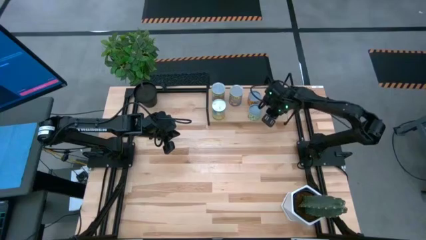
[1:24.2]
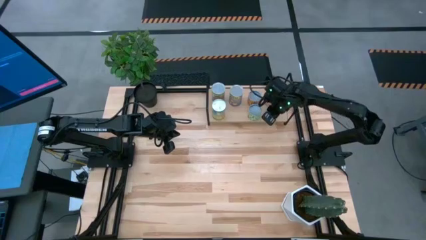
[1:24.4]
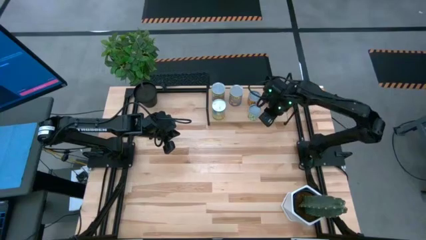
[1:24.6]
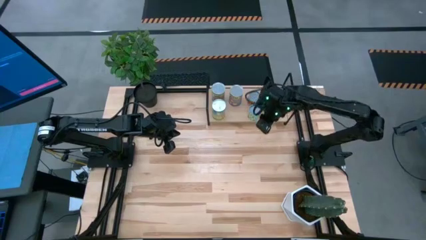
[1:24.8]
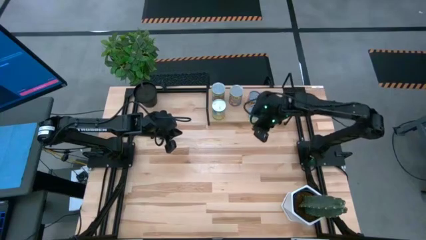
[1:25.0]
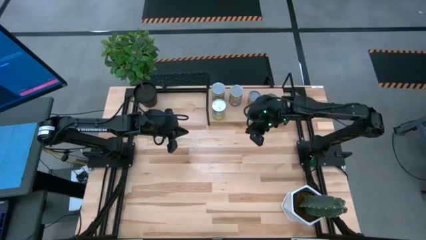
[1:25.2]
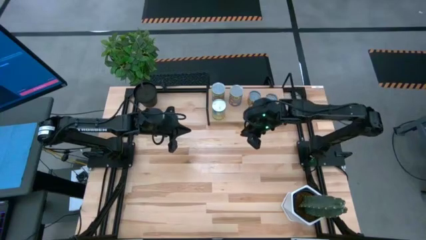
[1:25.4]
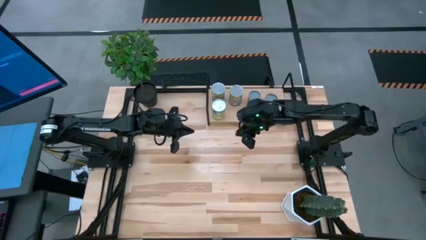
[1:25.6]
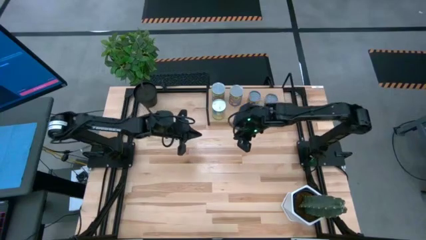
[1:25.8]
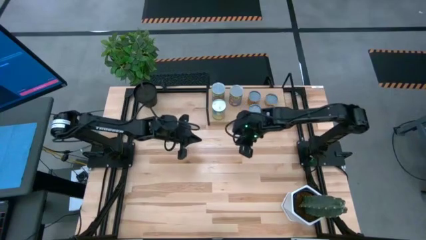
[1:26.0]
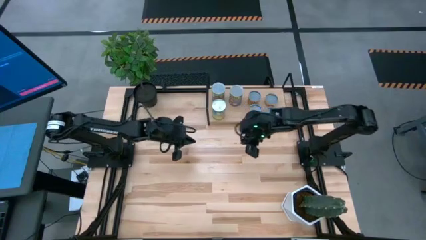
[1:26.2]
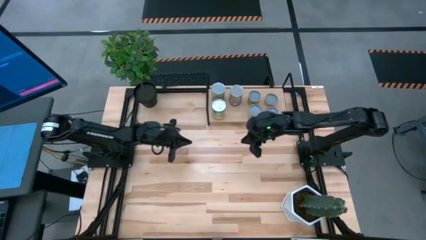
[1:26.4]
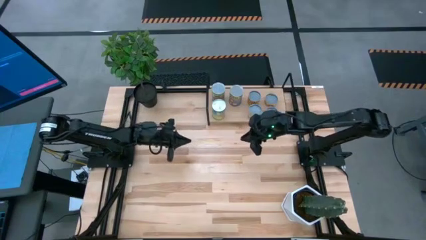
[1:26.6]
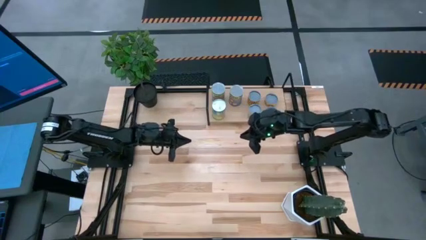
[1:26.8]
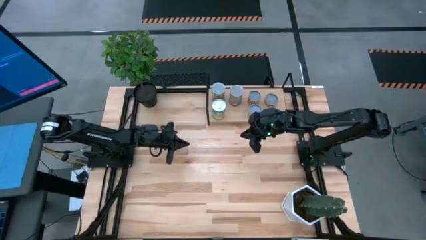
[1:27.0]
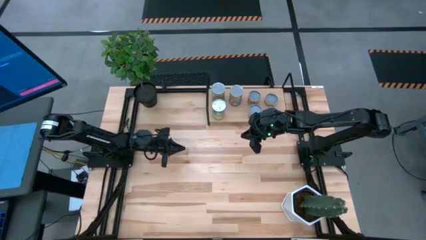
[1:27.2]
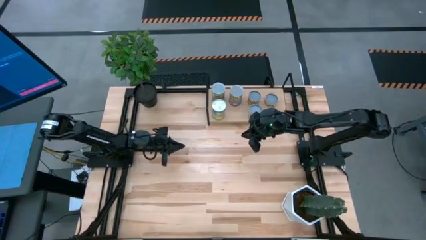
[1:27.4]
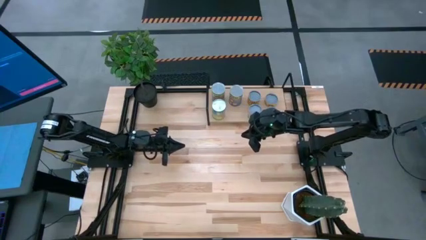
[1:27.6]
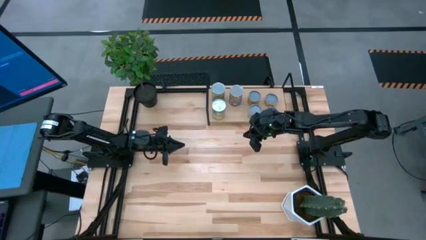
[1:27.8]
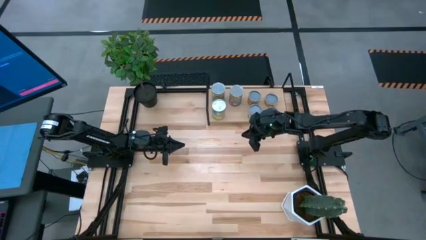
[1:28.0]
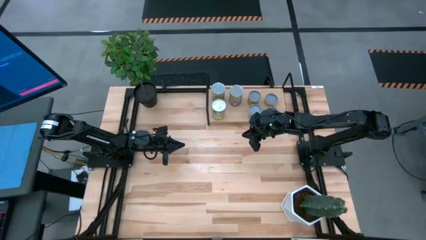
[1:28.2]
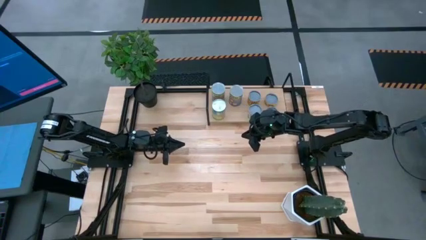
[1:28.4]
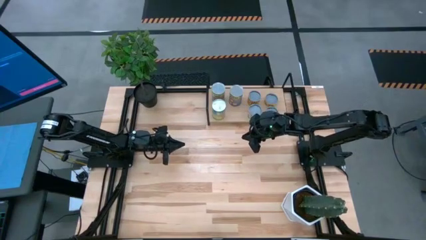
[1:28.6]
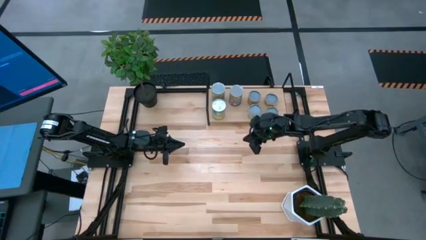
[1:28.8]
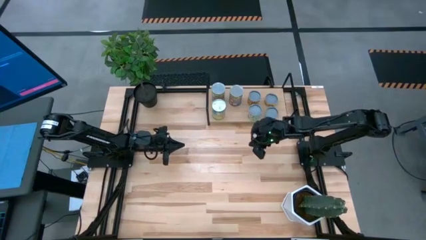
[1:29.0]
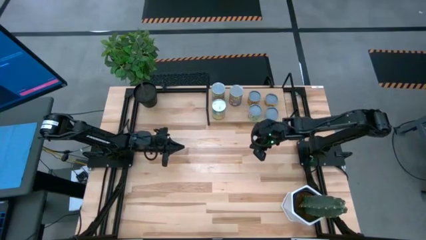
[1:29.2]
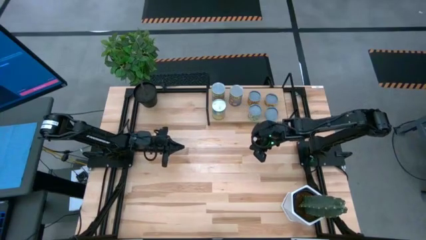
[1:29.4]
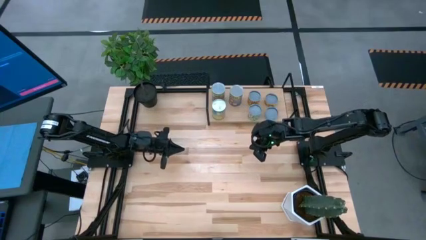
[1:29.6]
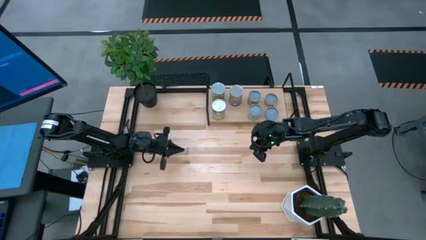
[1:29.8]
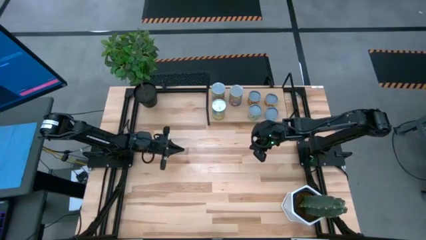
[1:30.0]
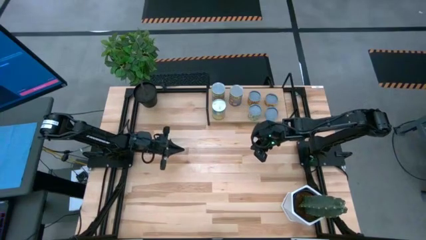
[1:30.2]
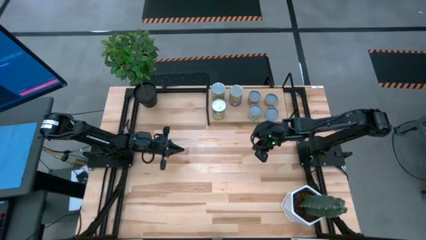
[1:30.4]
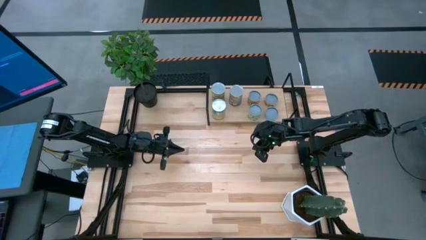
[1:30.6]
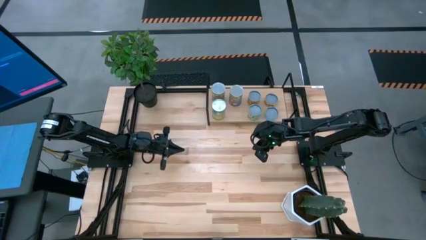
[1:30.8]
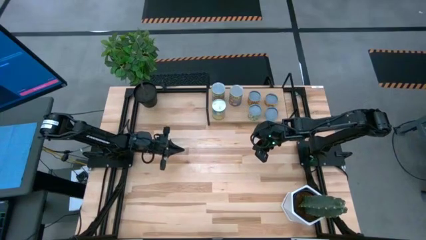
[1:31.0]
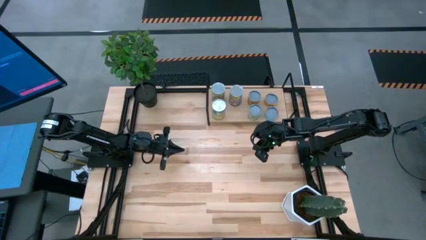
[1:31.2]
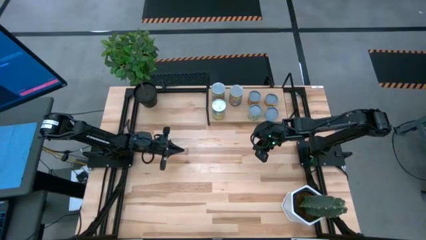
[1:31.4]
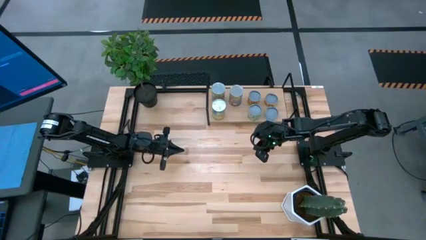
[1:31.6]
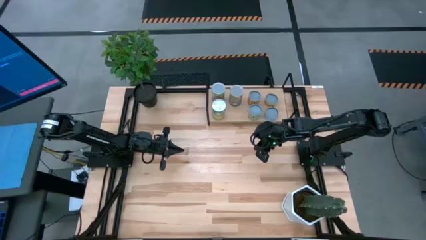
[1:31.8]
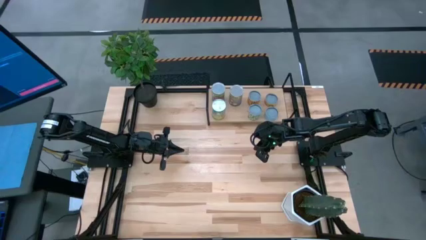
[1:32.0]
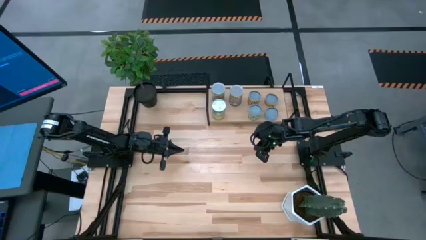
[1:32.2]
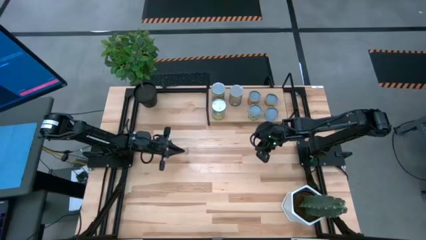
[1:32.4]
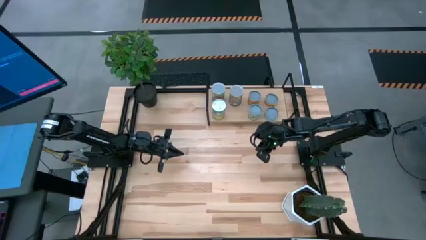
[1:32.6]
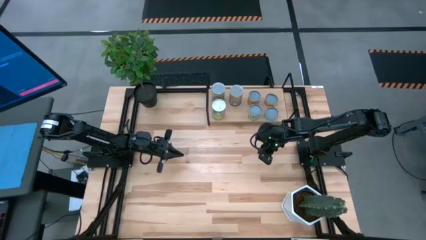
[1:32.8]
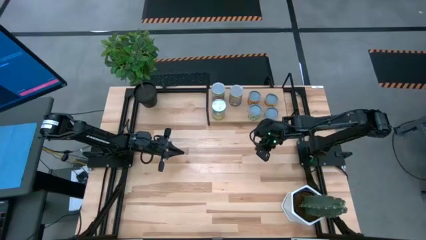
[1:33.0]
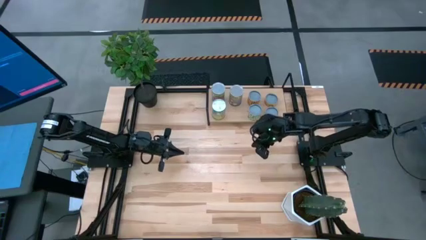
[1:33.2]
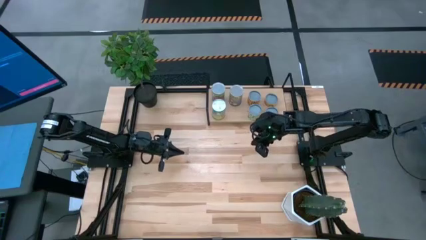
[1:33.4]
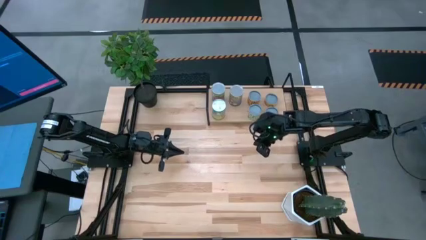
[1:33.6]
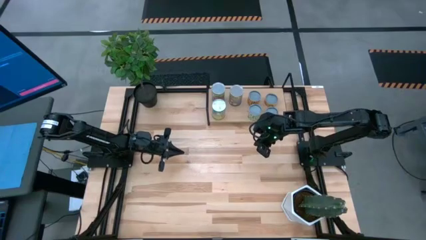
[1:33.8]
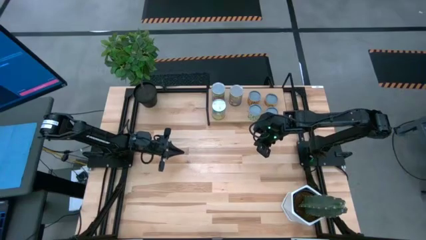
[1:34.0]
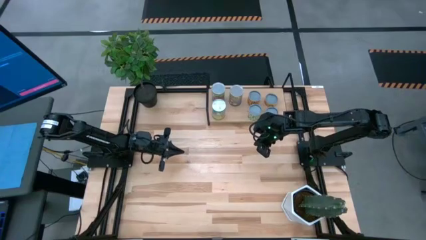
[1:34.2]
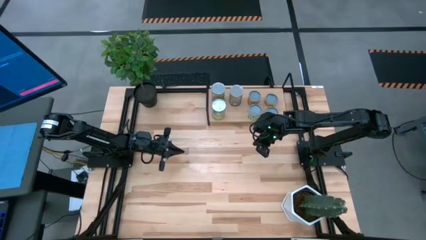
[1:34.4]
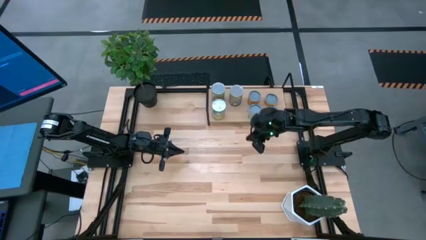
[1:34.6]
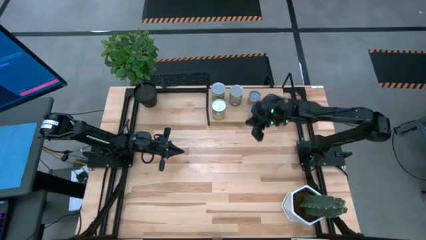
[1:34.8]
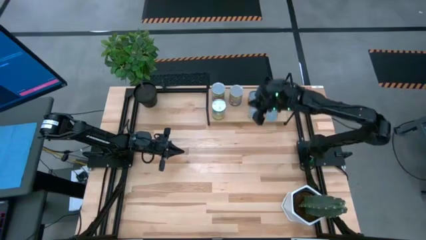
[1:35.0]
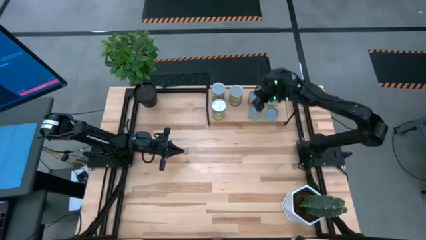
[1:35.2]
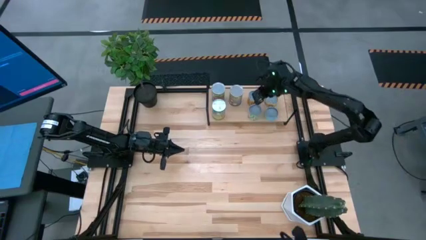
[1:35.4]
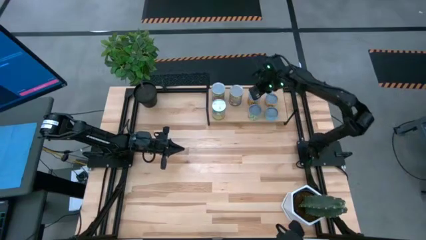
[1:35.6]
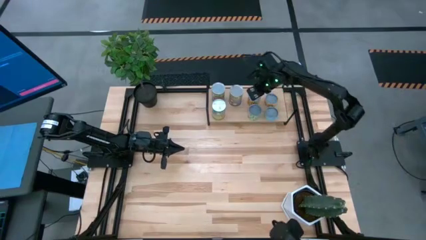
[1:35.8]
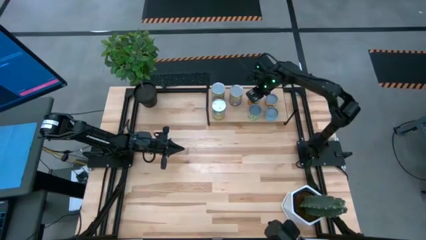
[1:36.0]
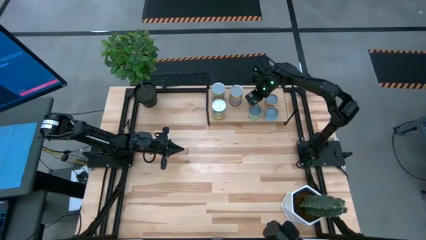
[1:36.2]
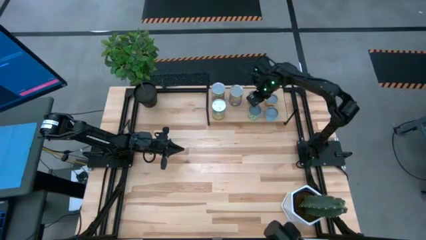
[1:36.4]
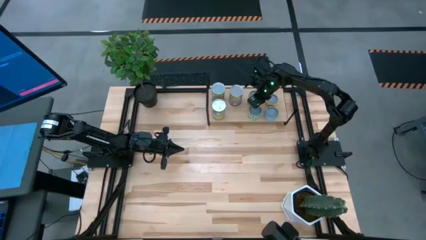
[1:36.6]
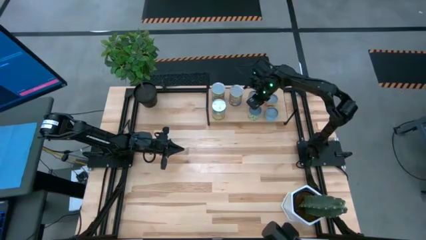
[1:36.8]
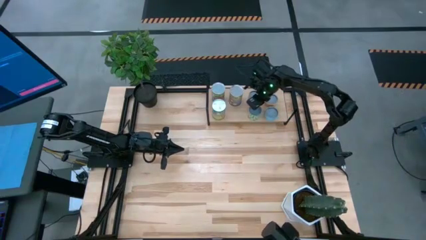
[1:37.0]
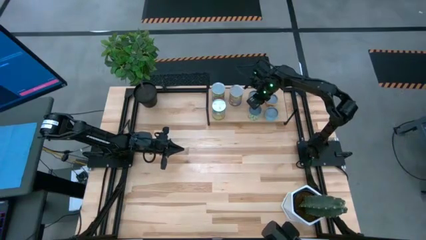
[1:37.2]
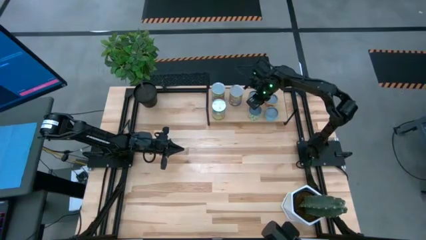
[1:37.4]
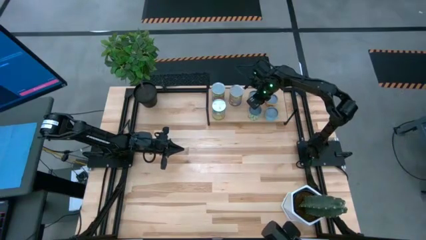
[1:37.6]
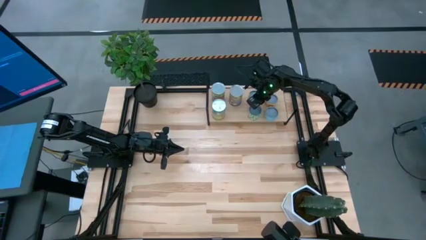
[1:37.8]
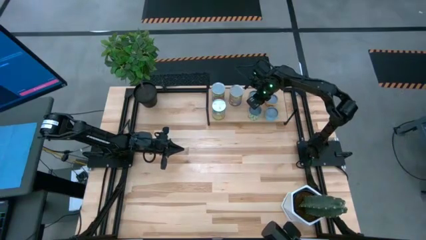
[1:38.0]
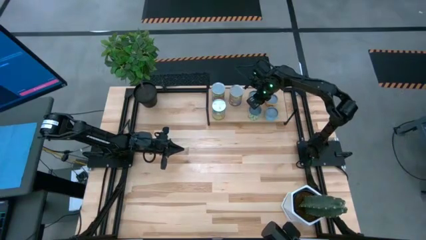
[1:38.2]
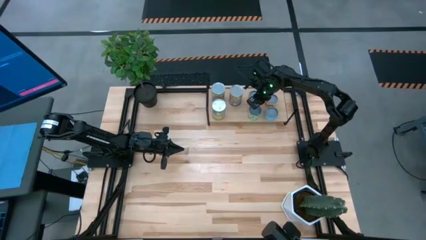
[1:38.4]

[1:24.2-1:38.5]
Task: Pick and place cans onto a shelf
Adjust the canned goods on the shelf
